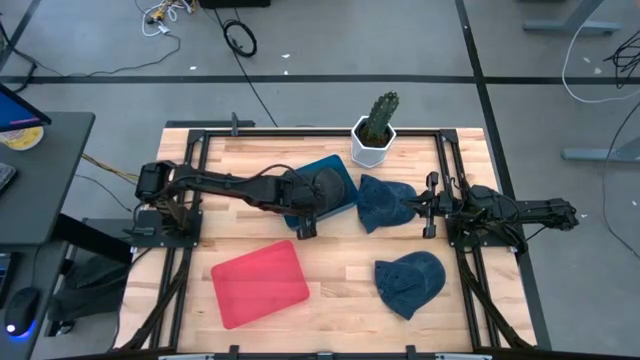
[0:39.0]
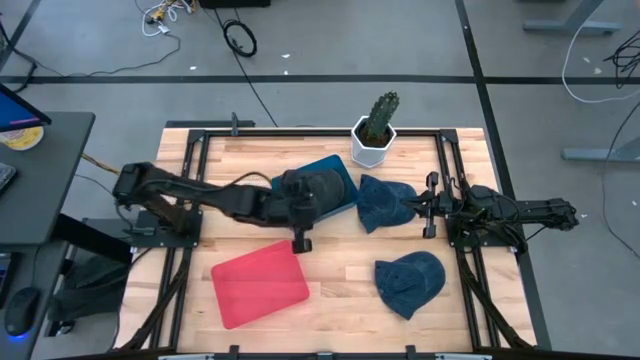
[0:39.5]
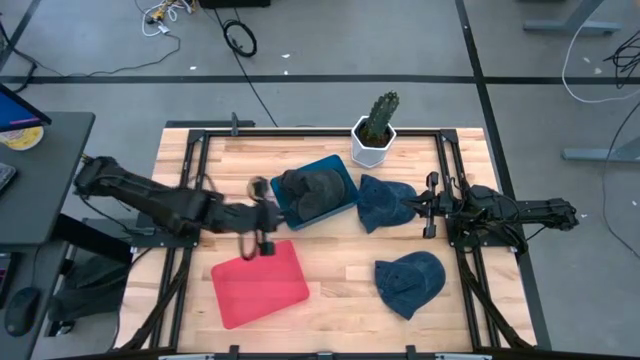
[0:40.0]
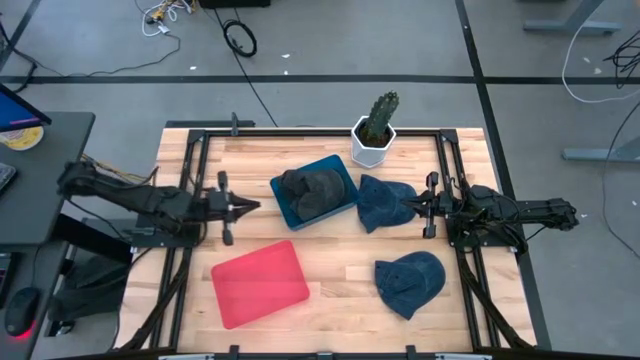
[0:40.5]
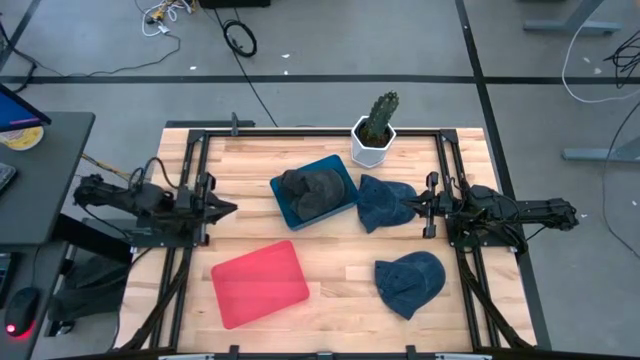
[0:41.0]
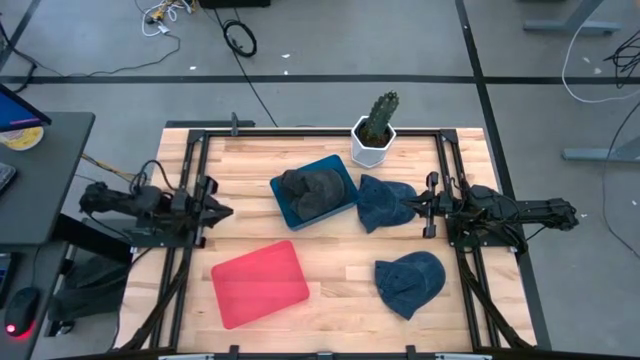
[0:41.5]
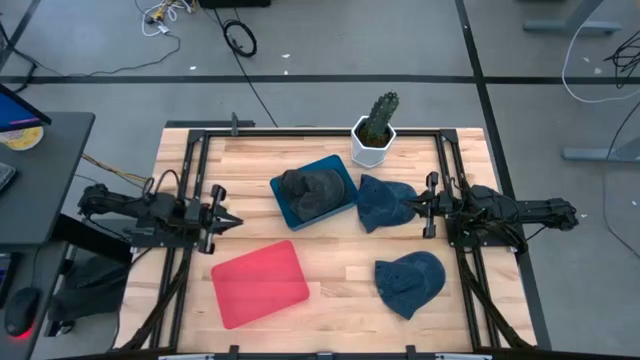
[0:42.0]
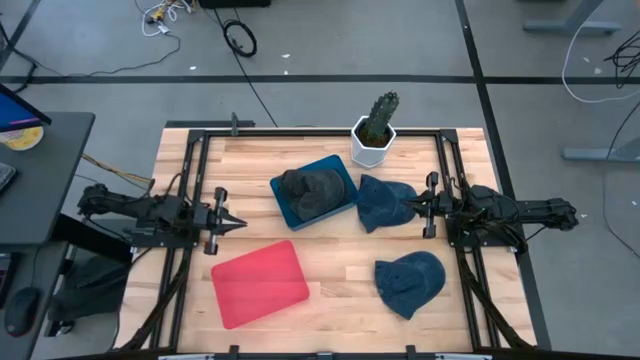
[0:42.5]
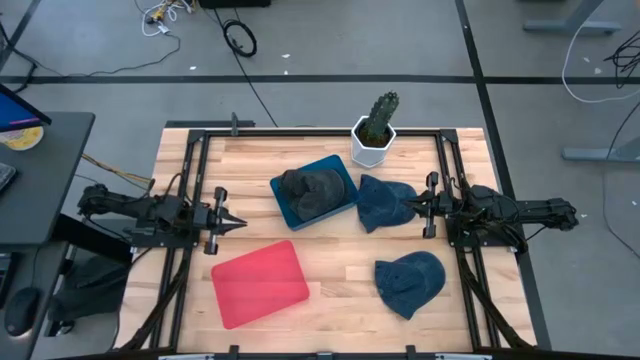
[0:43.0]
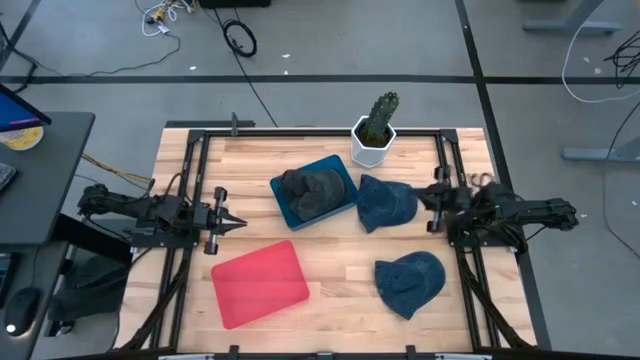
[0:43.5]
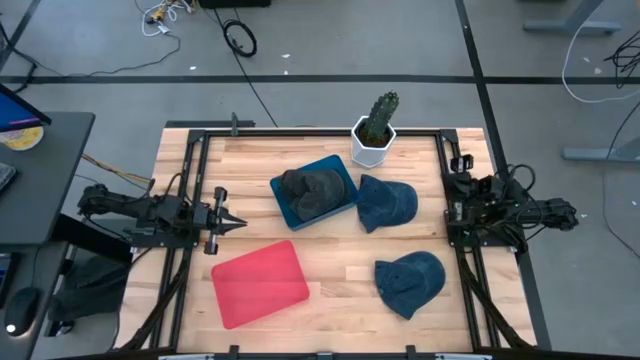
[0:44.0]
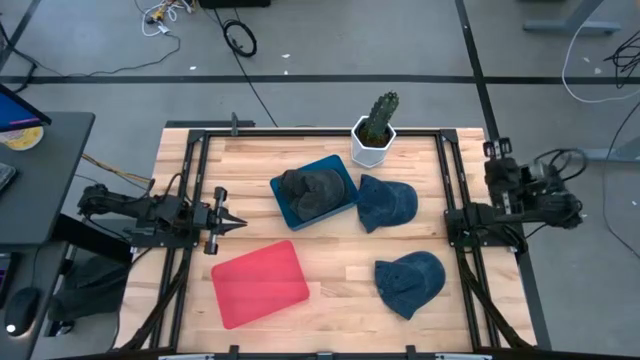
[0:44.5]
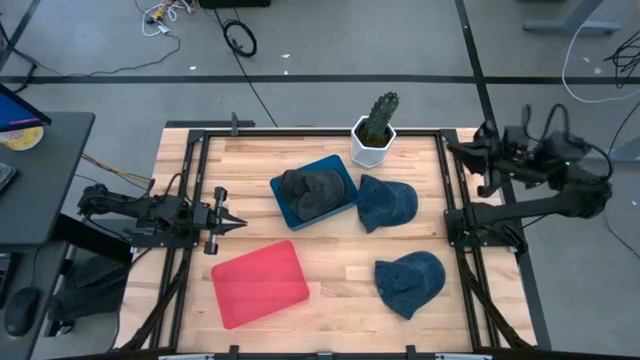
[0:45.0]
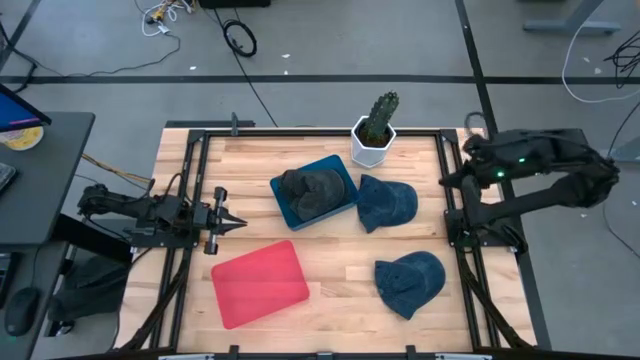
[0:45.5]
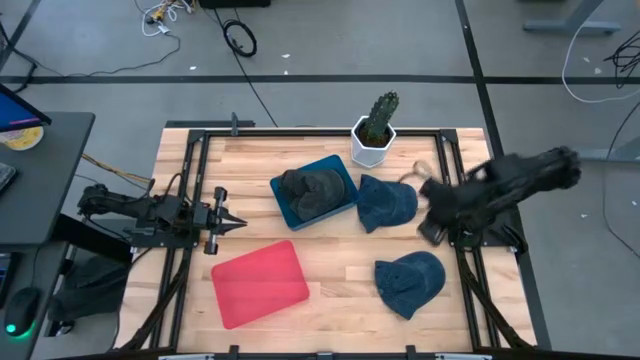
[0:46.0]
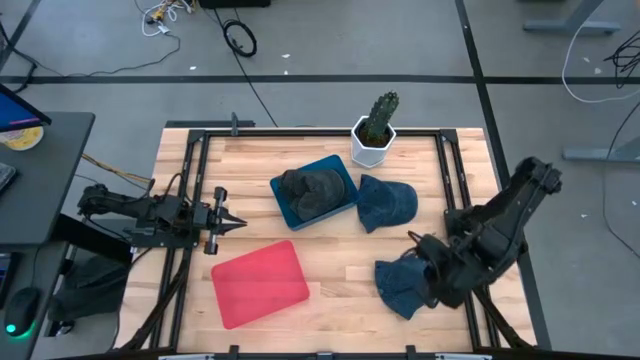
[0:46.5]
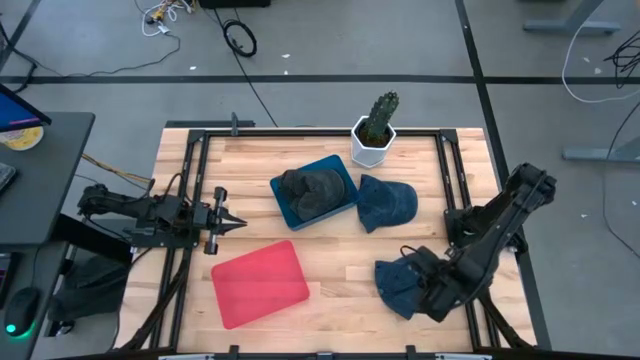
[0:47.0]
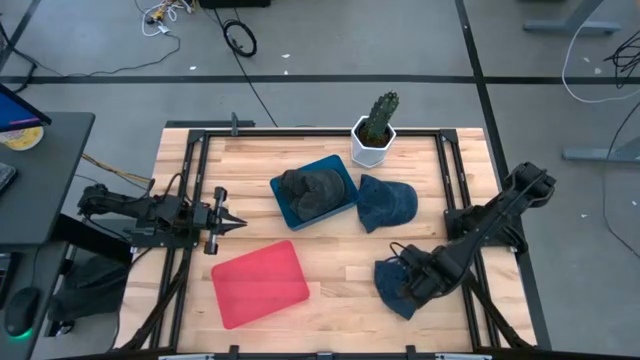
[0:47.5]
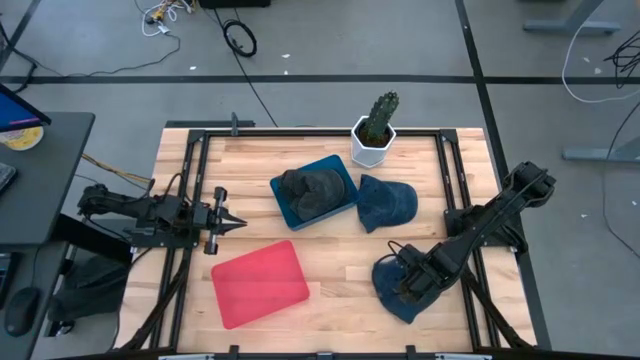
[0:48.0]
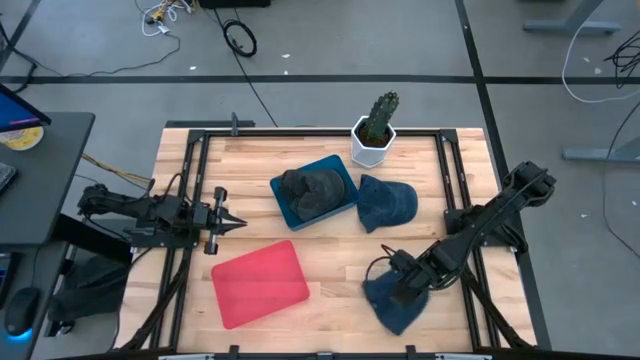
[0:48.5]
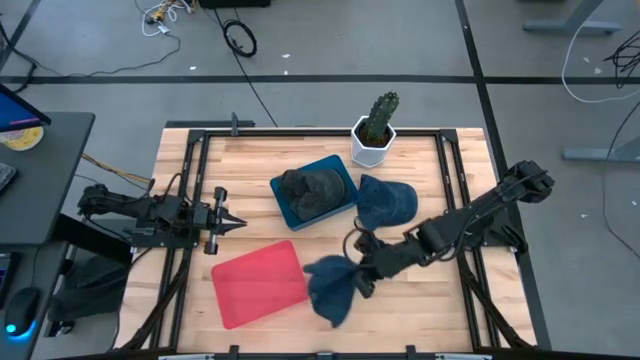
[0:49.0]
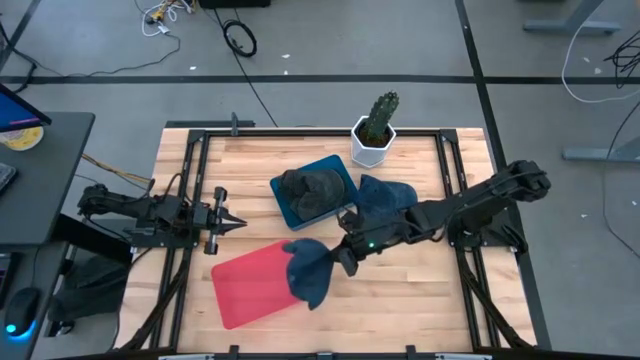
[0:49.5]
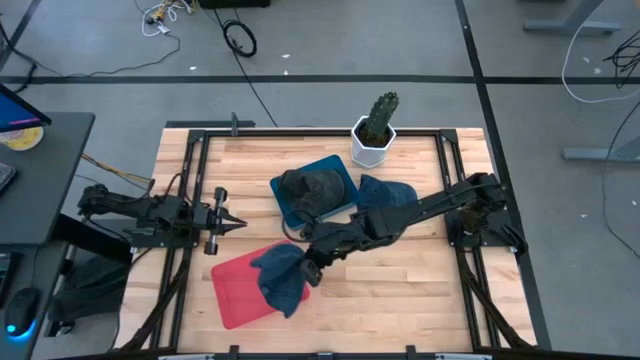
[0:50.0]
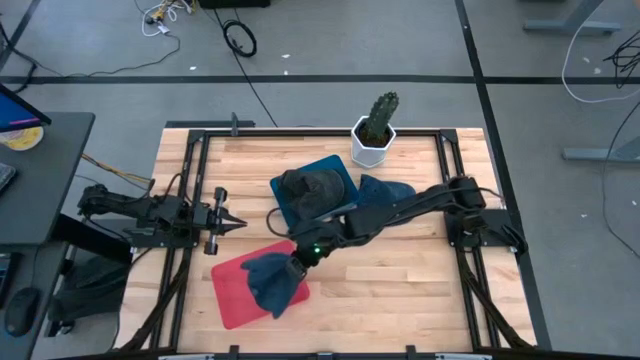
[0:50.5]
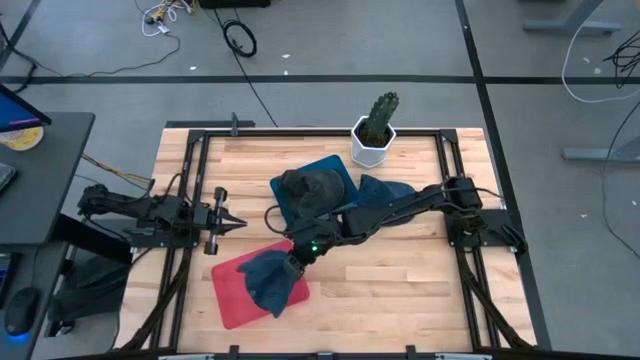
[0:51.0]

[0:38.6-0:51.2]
Task: Pick & Place hat
Put the bottom blue cap into the pink bin

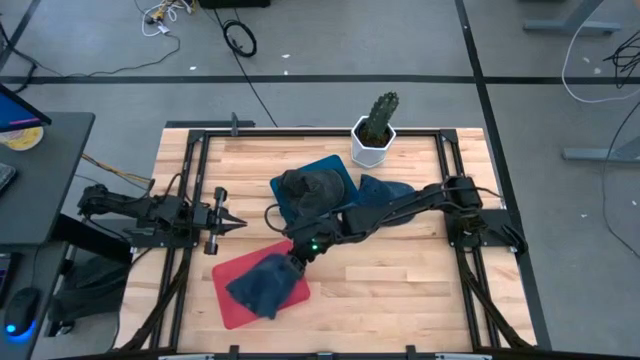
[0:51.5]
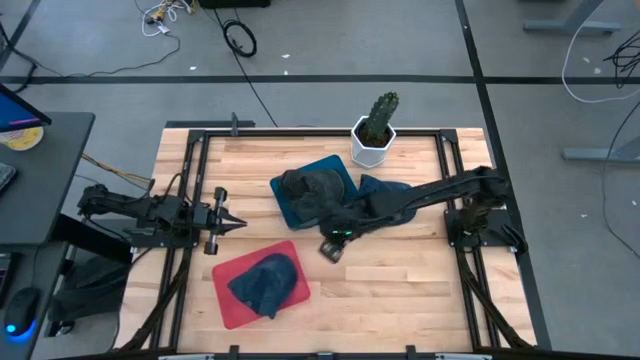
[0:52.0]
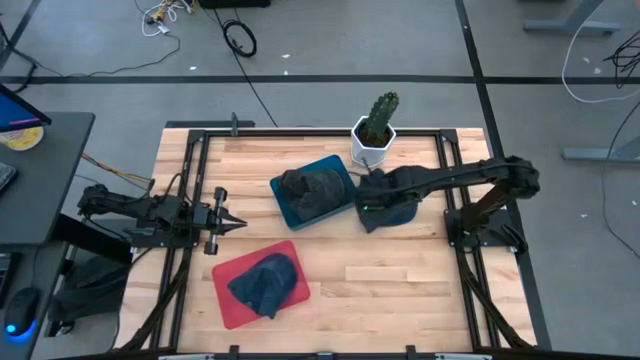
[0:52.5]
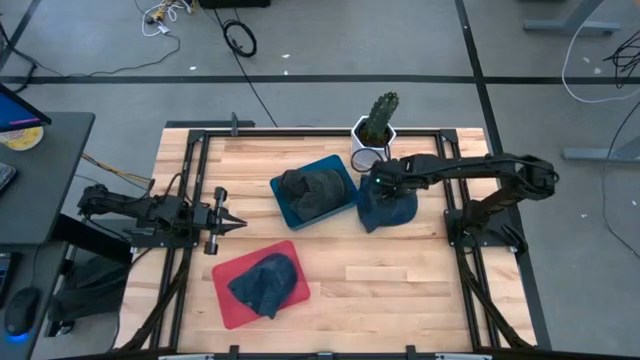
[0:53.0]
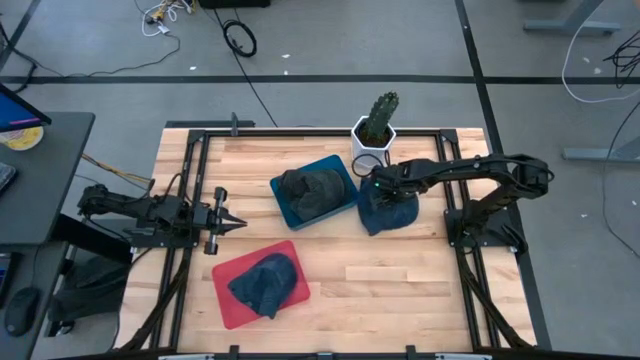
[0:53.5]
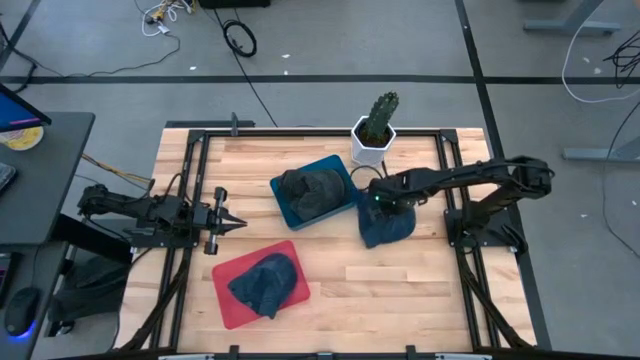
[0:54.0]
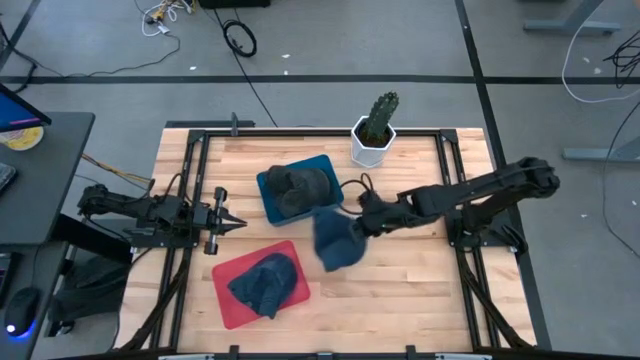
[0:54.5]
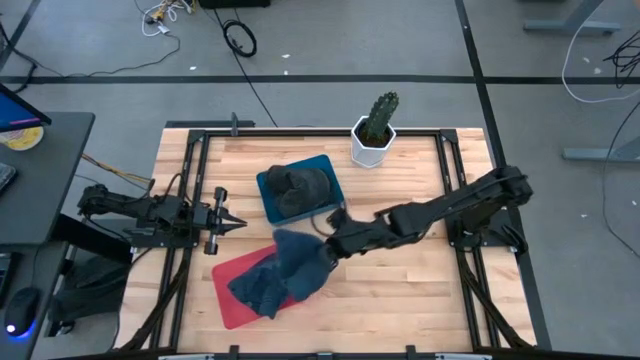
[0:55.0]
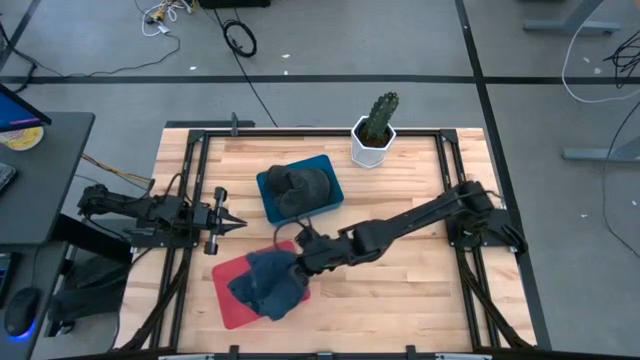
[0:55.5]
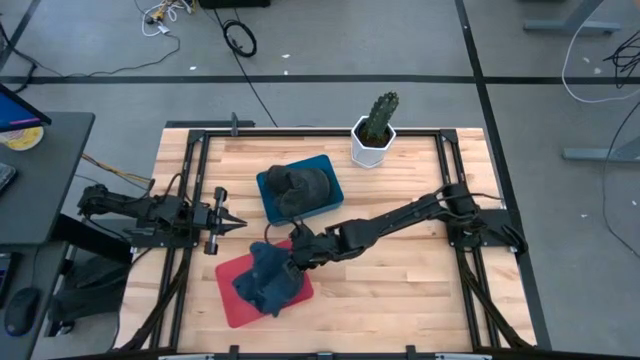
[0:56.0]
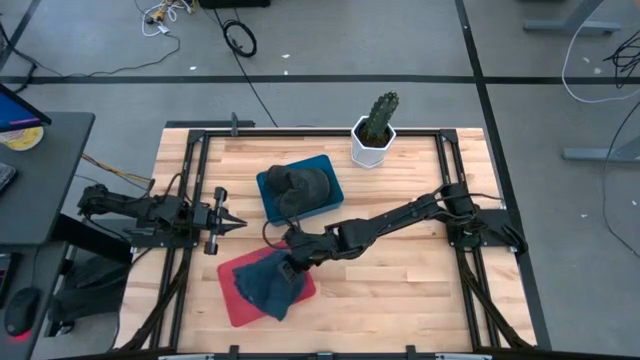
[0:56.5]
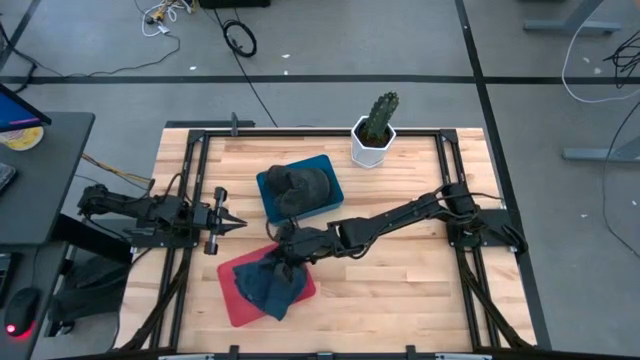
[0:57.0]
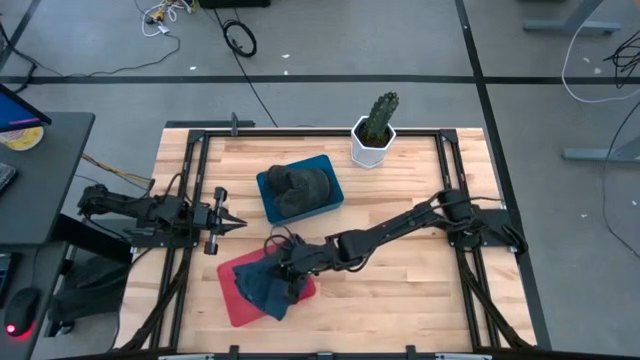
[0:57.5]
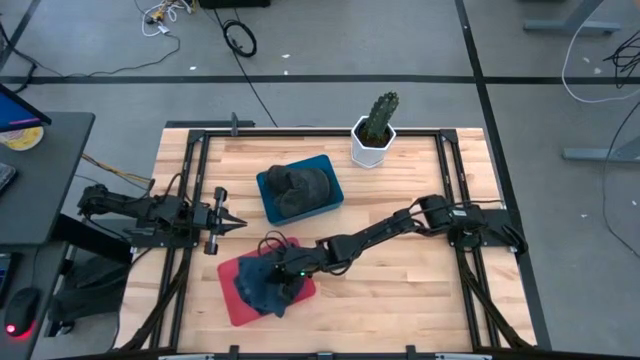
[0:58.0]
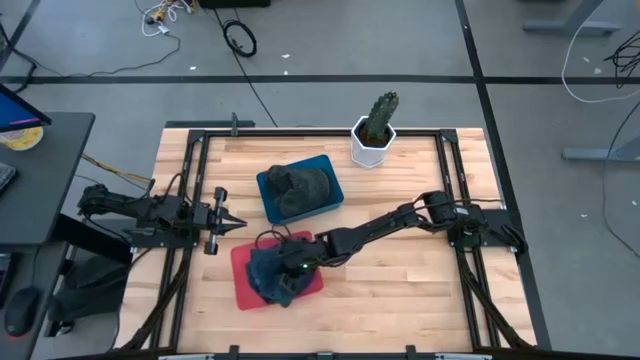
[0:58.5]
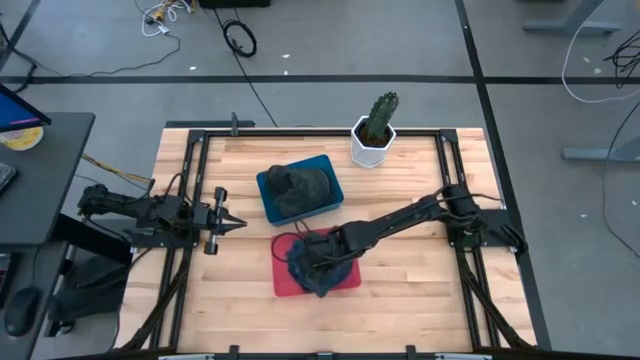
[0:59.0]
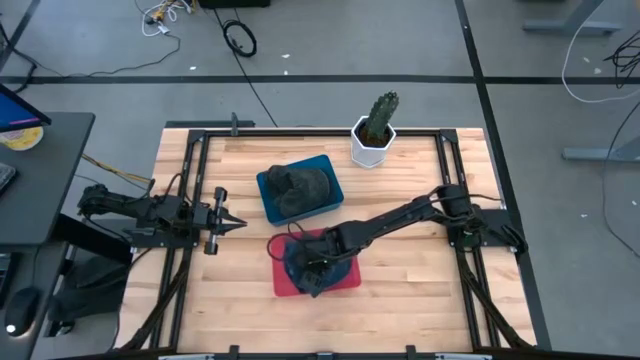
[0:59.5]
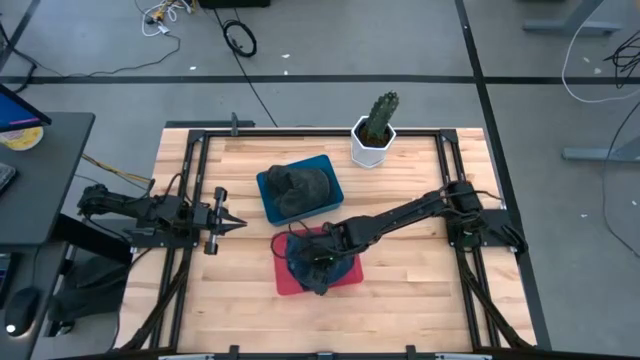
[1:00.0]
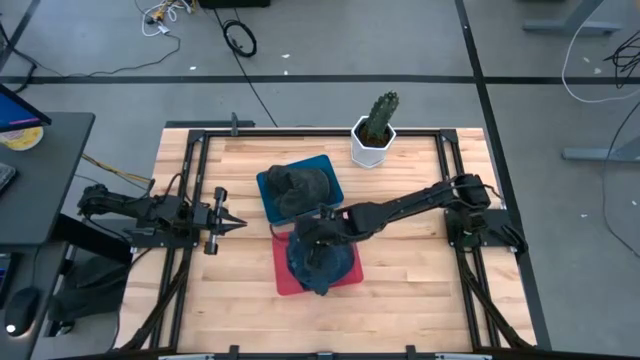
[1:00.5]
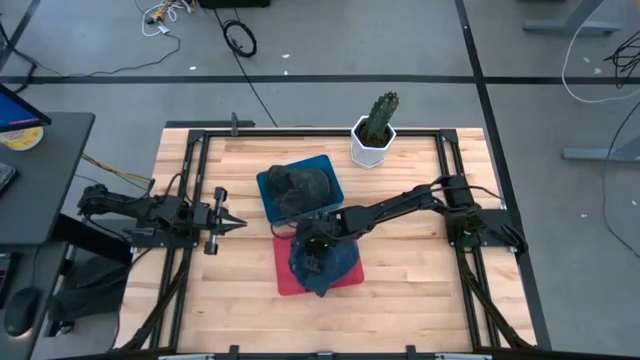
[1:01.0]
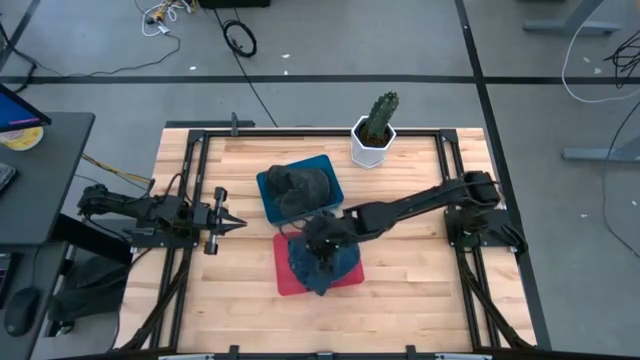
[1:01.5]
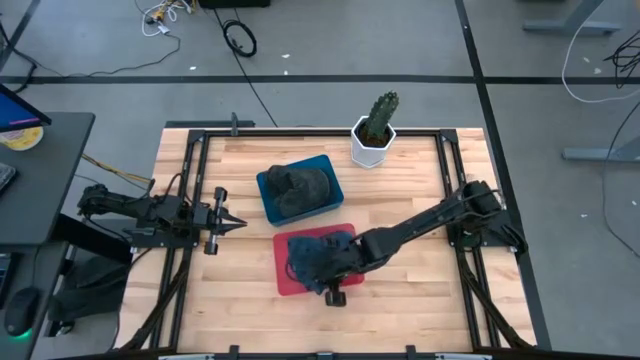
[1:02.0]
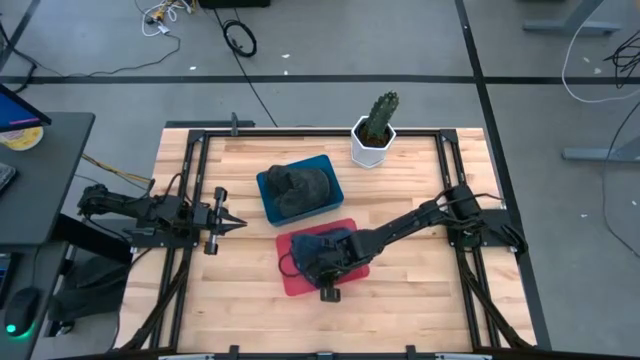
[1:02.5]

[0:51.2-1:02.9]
Put the blue cap into the pink bin
